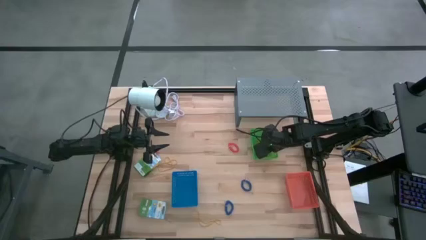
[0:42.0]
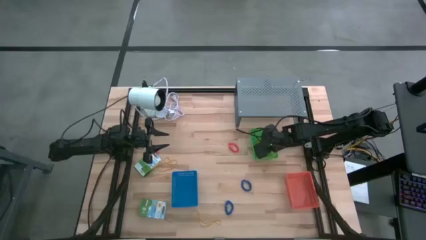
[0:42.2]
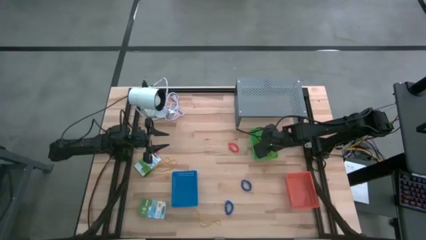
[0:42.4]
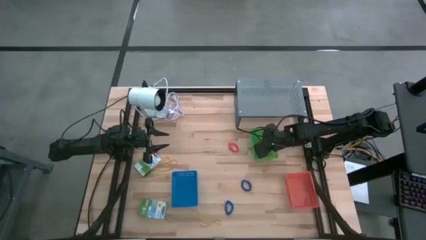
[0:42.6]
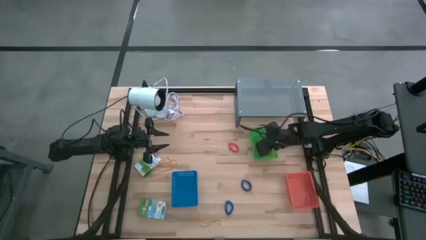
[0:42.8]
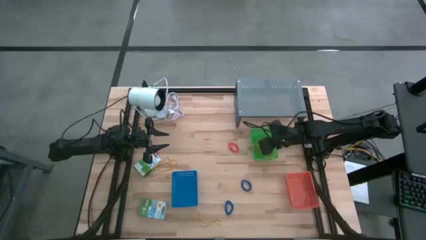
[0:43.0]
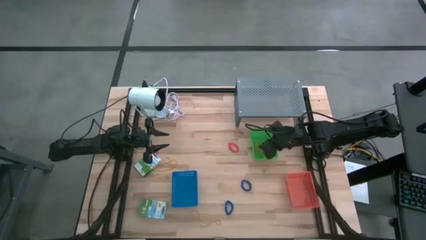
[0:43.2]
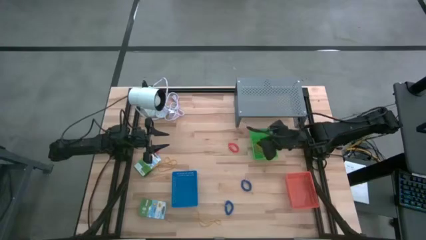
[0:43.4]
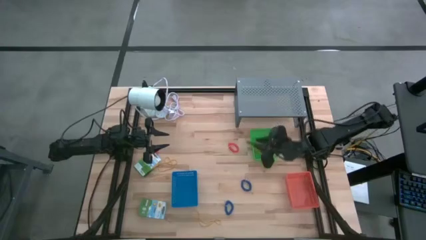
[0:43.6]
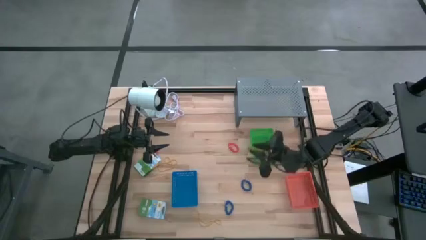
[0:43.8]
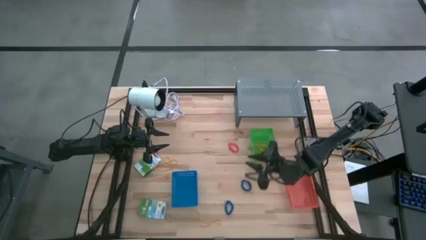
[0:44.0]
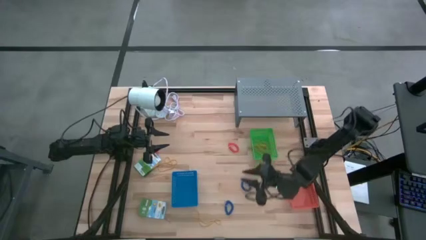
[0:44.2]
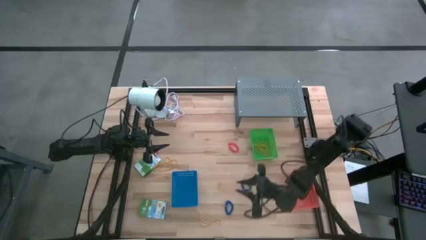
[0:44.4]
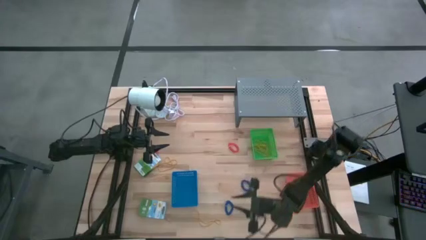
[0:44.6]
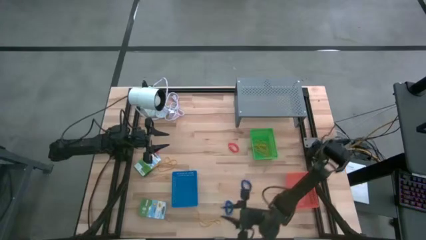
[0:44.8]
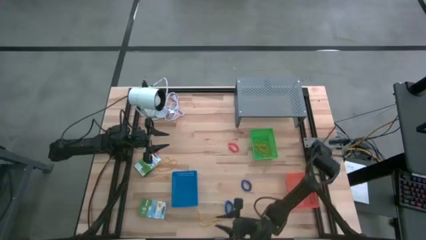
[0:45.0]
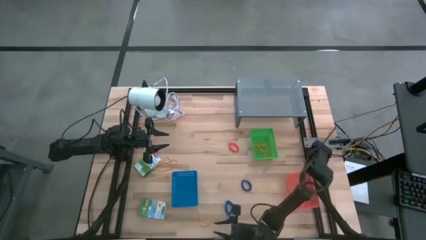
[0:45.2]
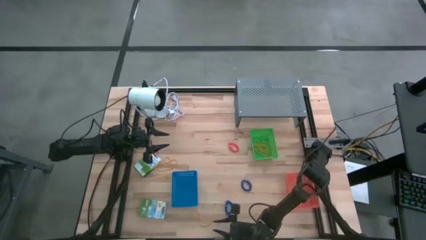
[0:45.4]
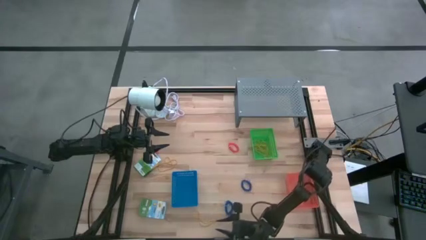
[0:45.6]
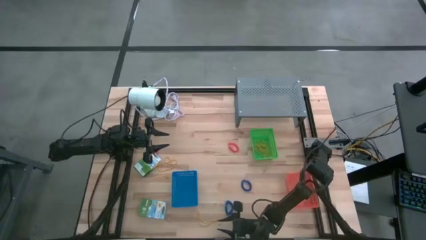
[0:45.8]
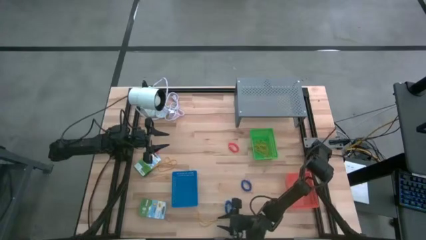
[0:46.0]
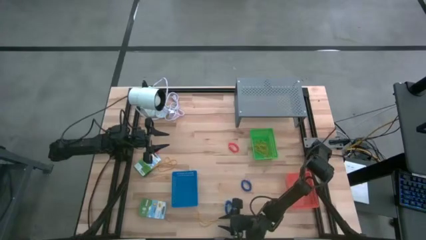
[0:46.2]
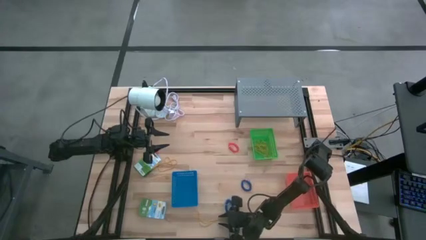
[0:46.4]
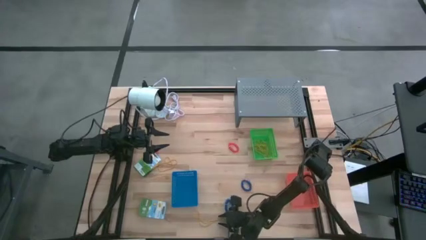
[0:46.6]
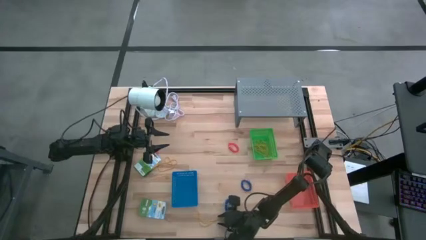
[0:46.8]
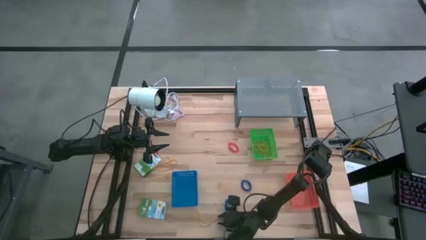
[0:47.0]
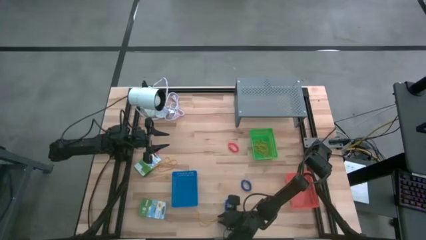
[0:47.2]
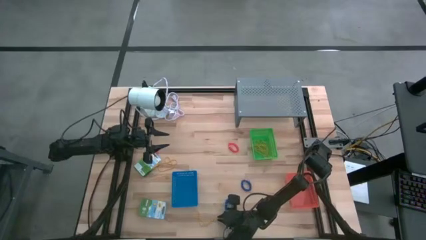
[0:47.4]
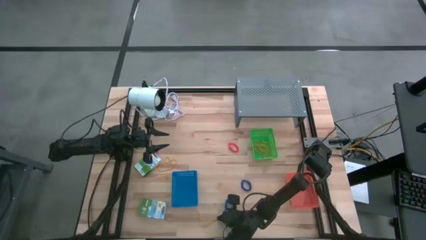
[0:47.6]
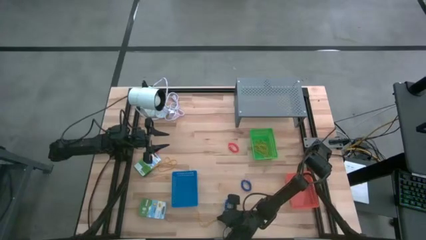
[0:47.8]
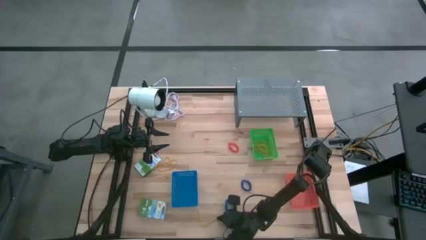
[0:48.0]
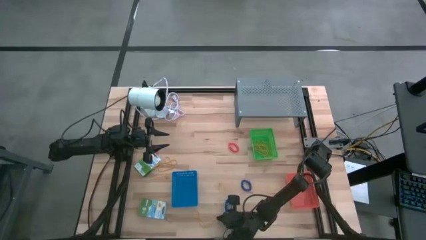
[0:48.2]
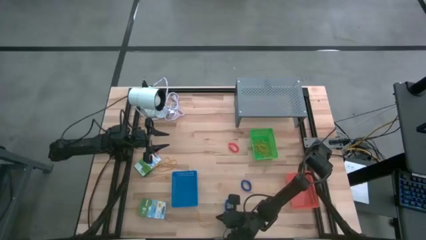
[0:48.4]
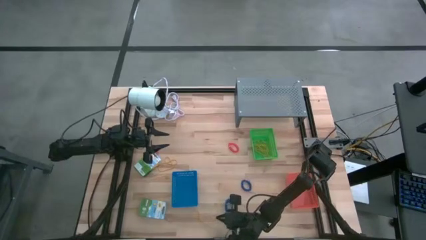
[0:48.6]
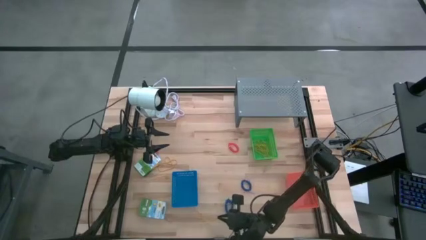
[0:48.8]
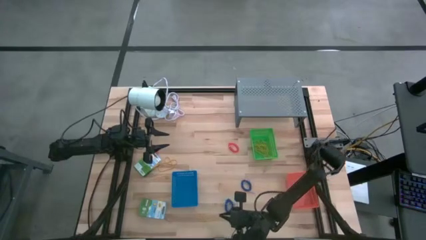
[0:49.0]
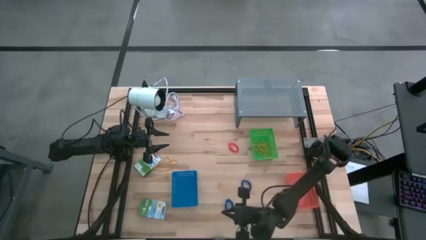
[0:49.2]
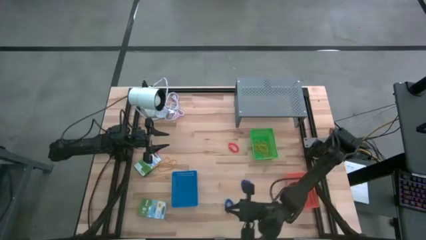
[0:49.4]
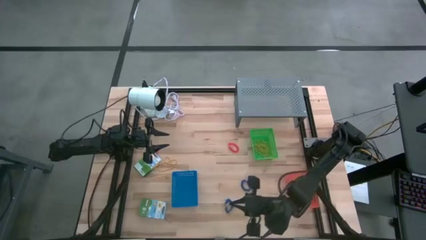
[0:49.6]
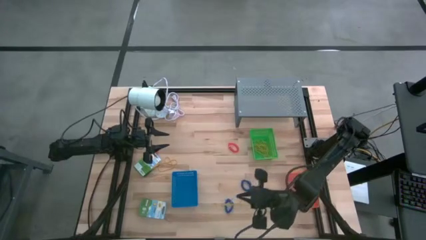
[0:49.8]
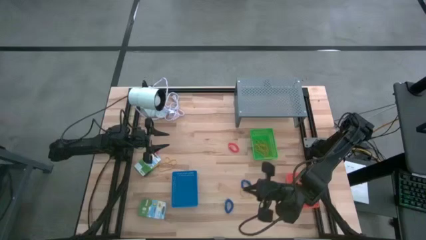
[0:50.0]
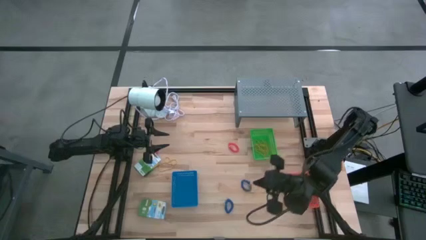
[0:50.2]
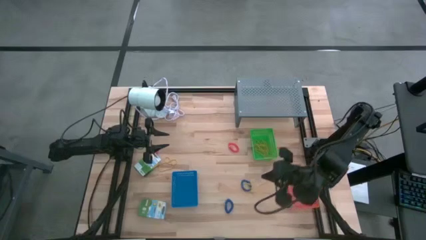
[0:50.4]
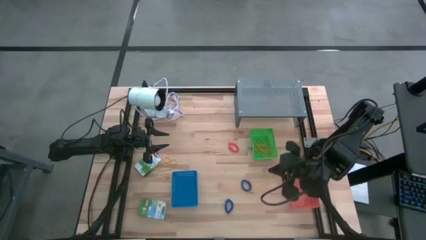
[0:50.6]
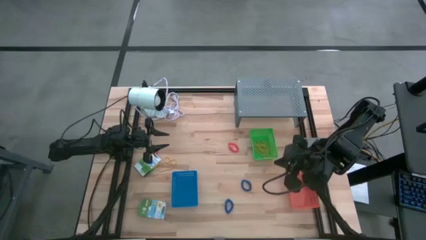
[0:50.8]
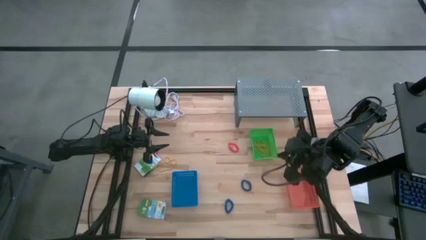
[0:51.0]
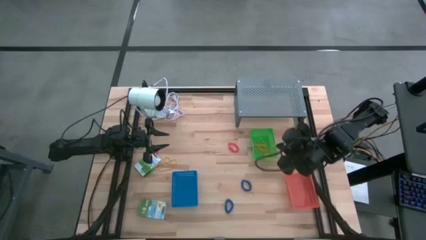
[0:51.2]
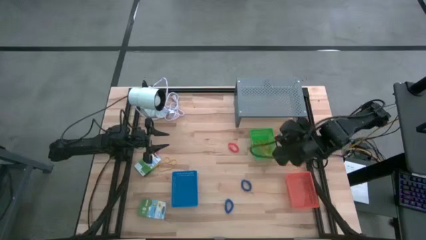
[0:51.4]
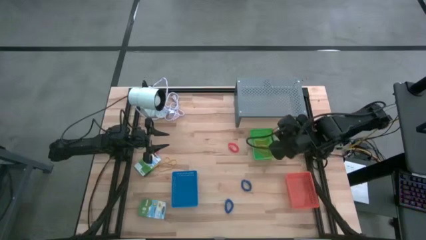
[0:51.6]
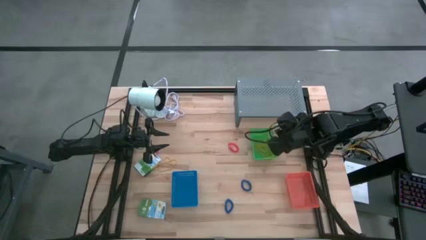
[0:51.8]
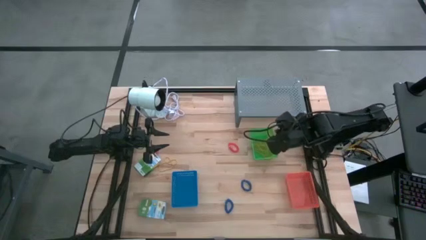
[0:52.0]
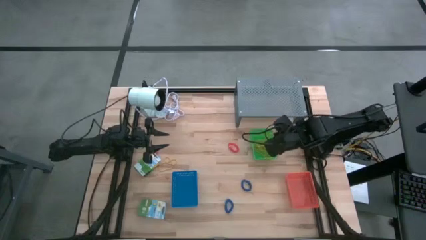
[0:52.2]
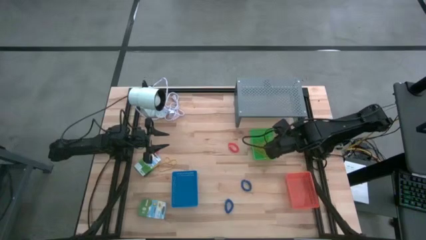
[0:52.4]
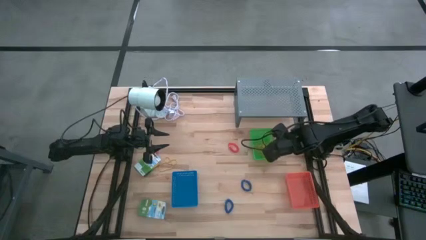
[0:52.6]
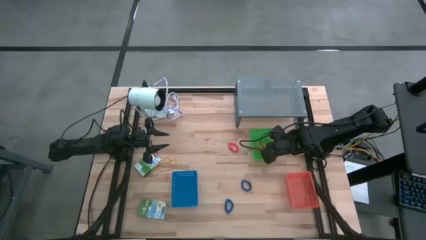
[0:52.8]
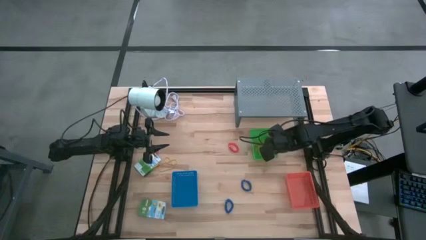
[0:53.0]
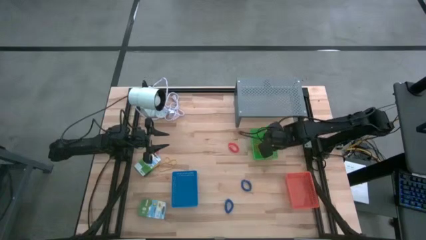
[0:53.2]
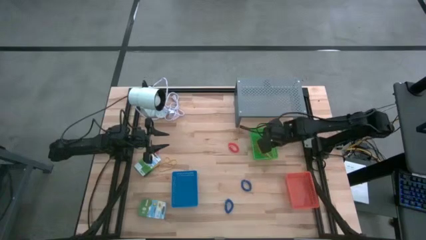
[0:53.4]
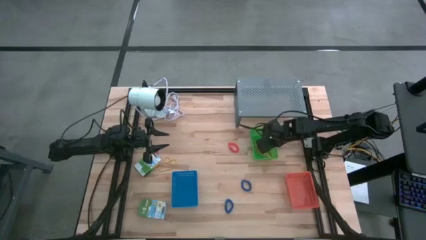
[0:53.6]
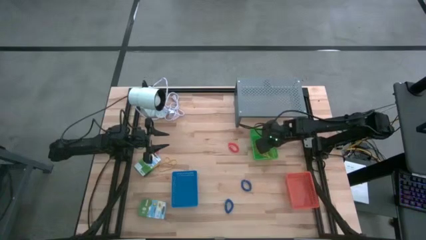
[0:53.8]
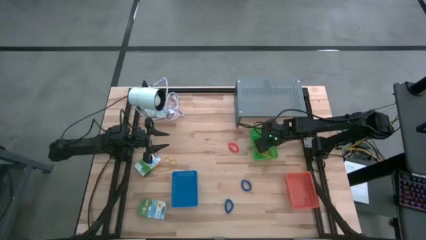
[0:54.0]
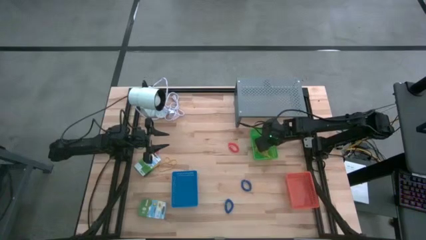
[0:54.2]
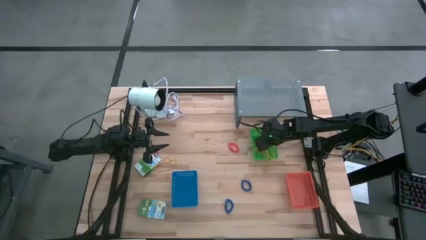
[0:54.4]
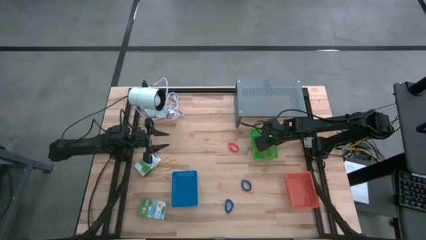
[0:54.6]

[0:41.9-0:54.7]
Task: Pick & Place Office Desk Supplies
Put the yellow rubber band into the green bin

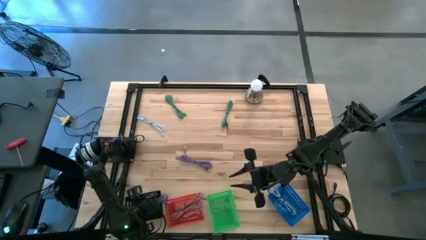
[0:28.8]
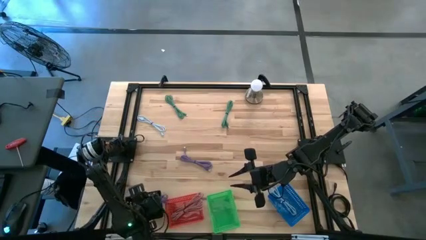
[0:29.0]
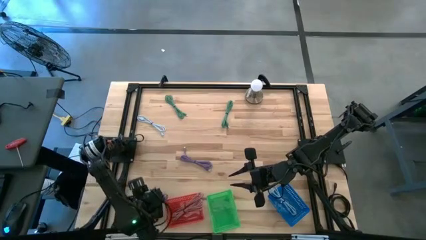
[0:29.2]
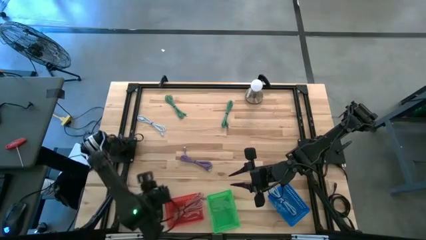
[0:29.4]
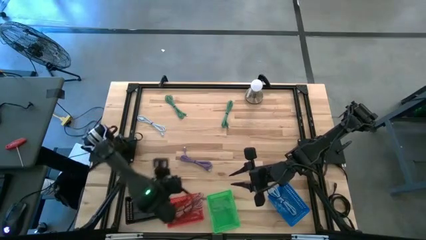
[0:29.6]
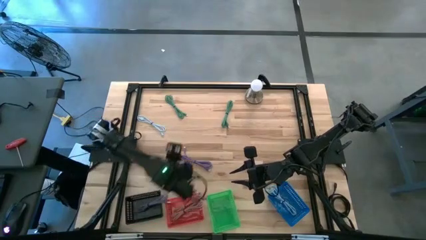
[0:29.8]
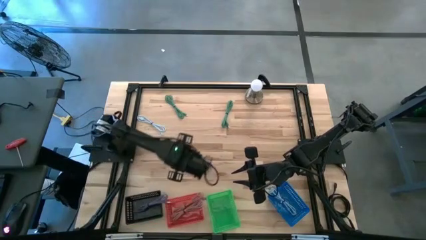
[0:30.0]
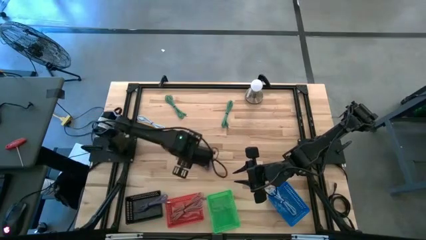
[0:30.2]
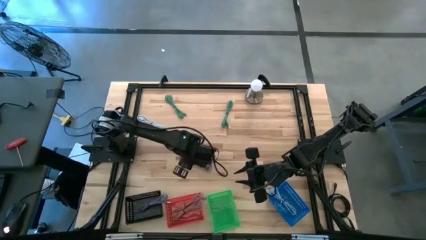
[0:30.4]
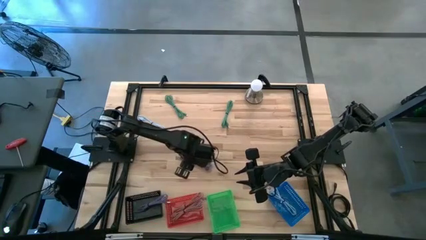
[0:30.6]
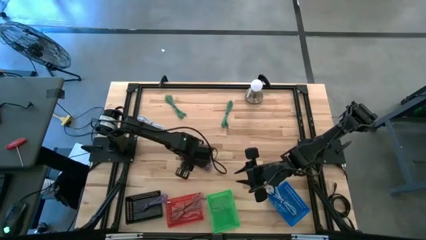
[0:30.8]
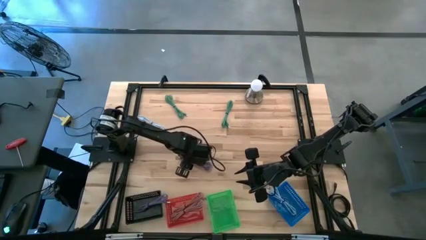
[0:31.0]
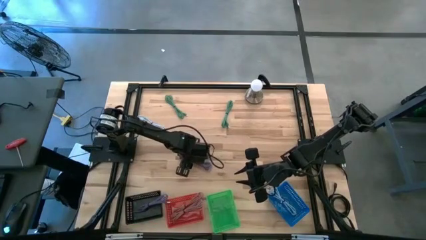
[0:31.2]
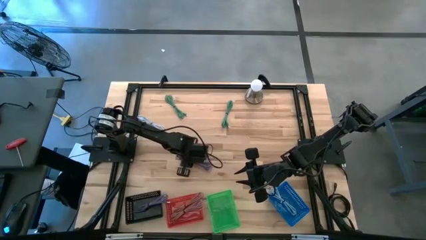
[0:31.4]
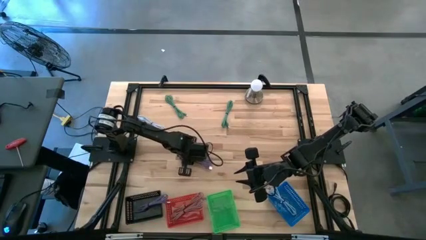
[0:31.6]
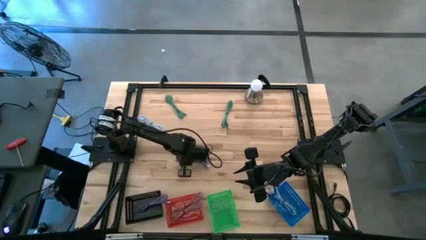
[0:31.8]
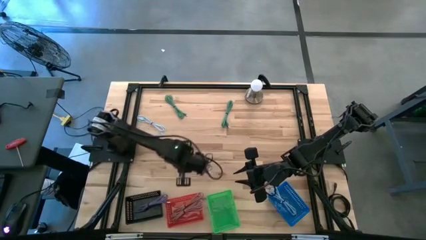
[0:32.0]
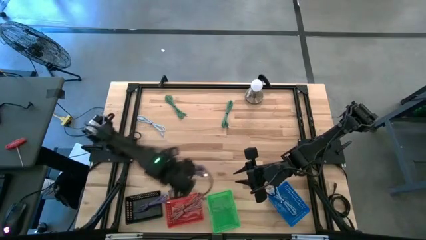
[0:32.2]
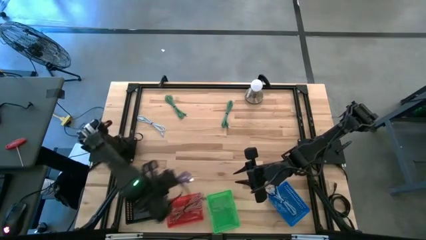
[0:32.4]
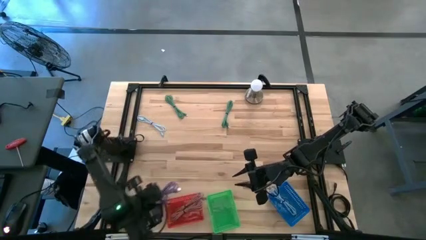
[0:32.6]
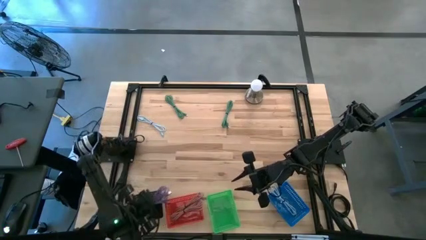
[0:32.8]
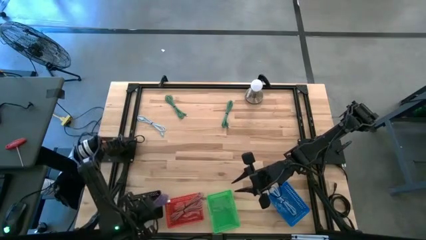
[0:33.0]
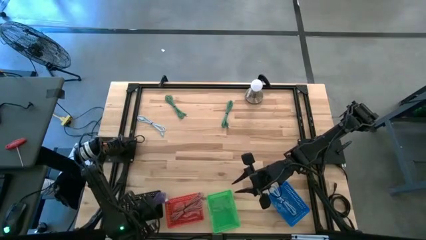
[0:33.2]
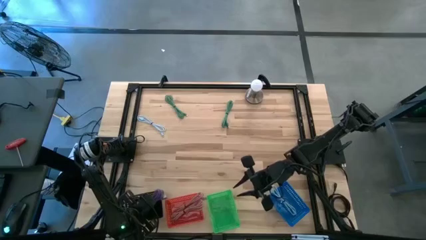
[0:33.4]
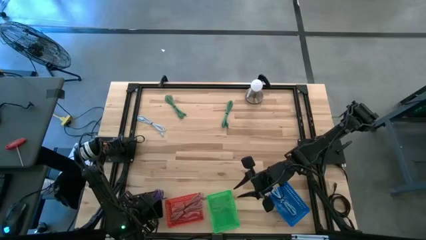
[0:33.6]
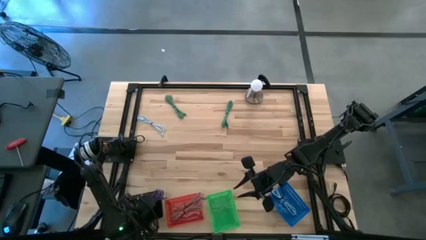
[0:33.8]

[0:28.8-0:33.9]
Task: Pick & Place USB Port
Put the purple USB charger into the black bin
